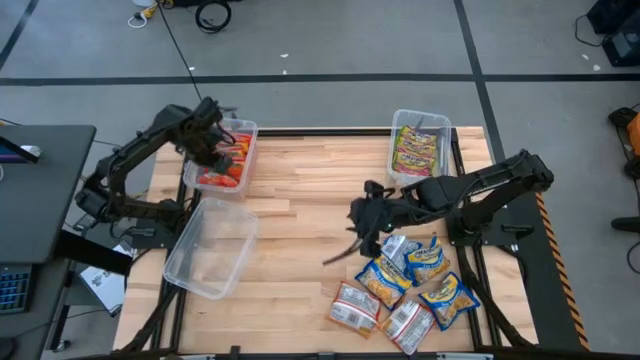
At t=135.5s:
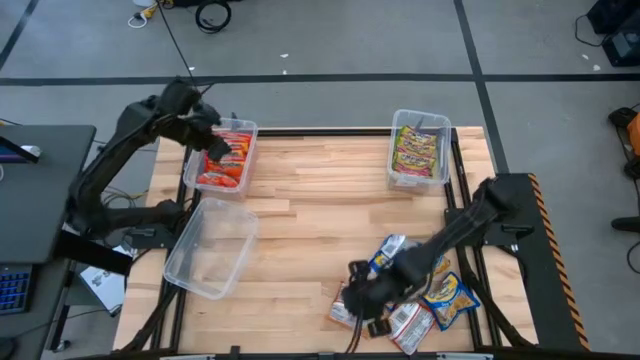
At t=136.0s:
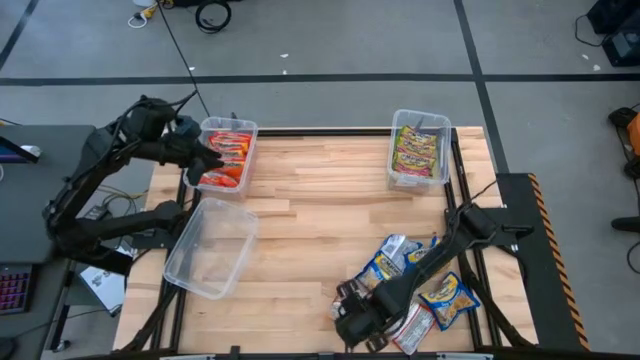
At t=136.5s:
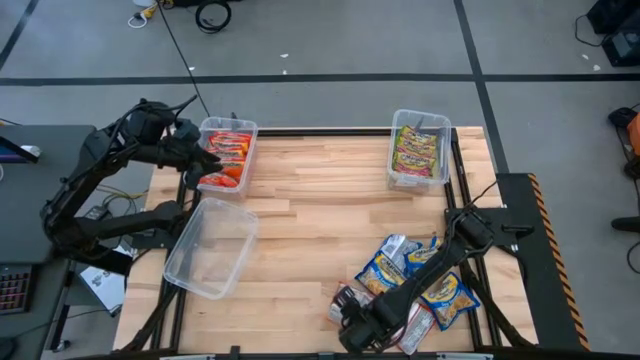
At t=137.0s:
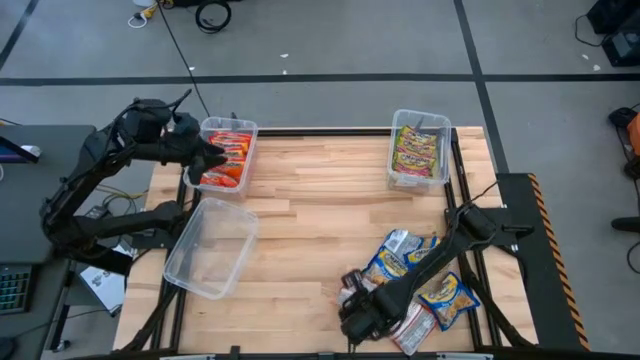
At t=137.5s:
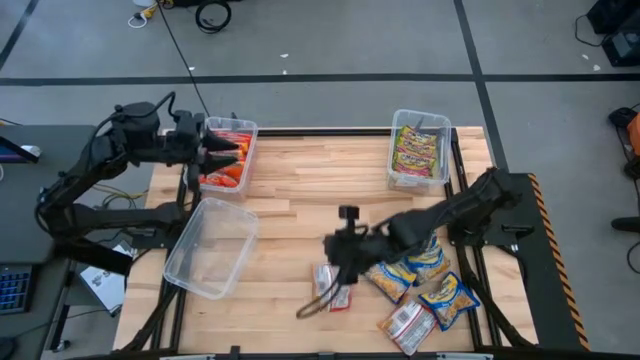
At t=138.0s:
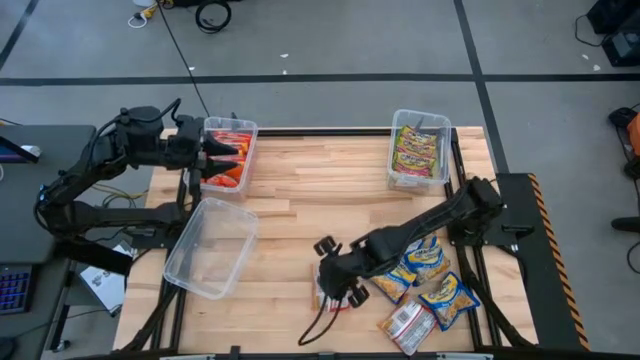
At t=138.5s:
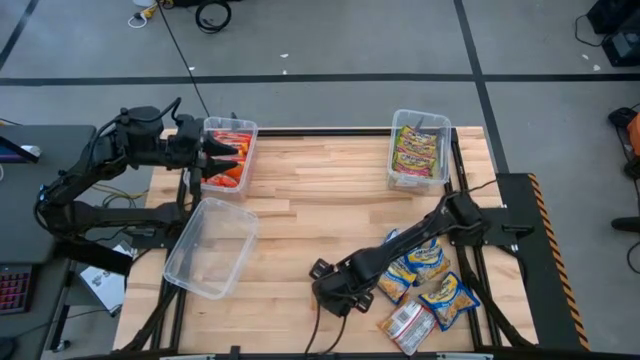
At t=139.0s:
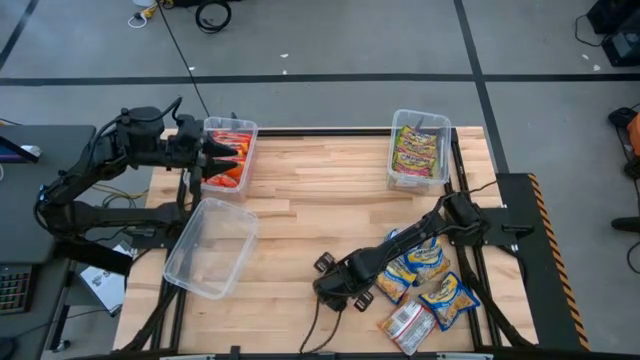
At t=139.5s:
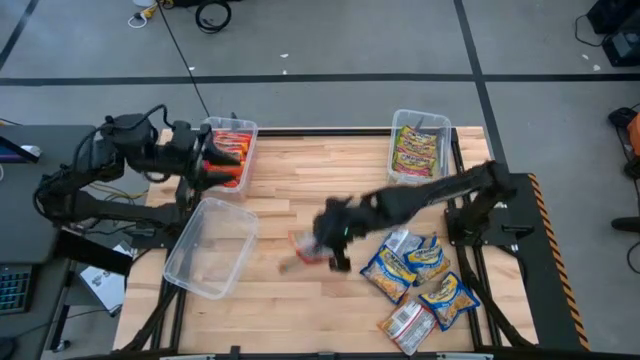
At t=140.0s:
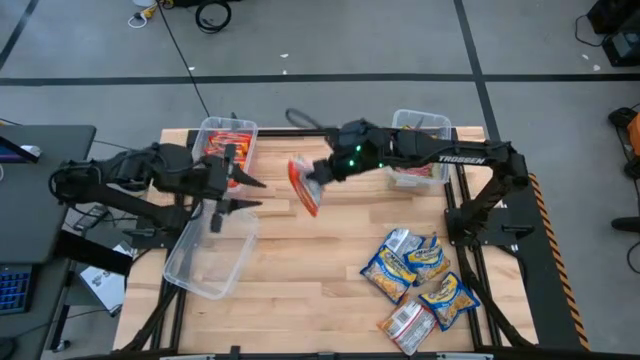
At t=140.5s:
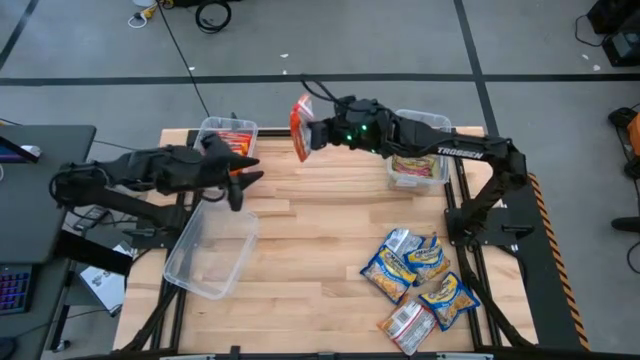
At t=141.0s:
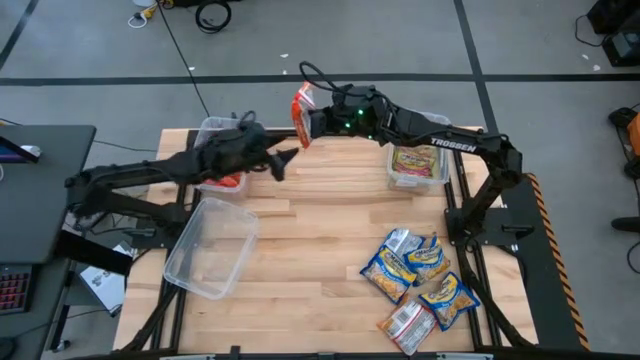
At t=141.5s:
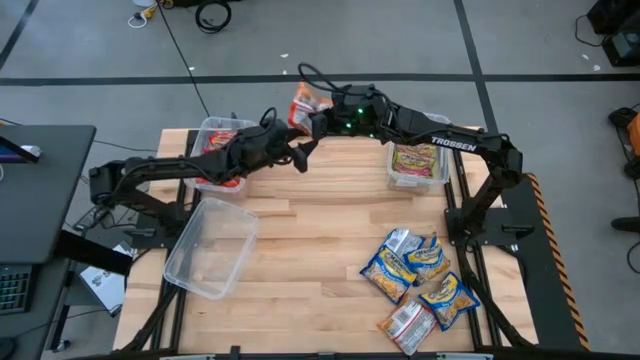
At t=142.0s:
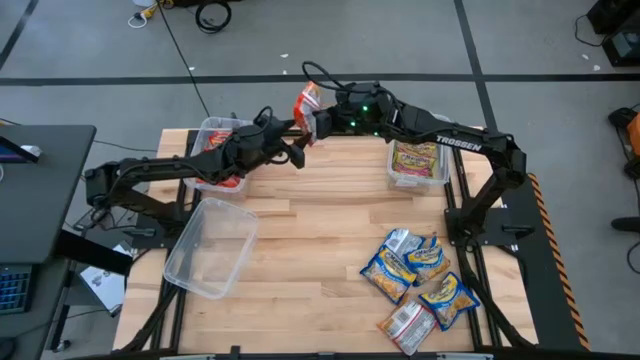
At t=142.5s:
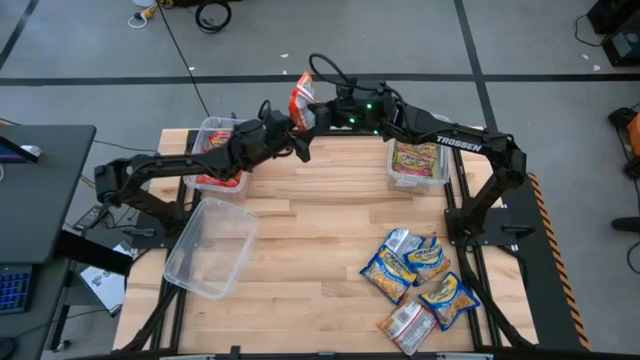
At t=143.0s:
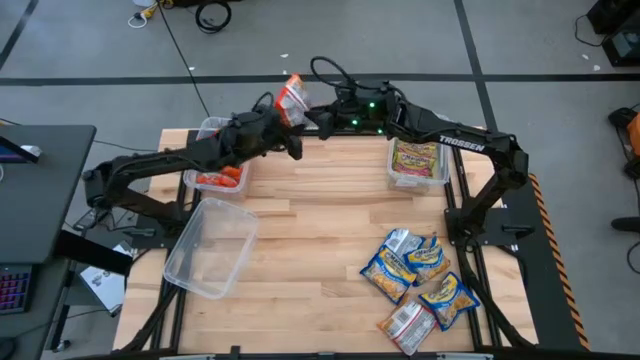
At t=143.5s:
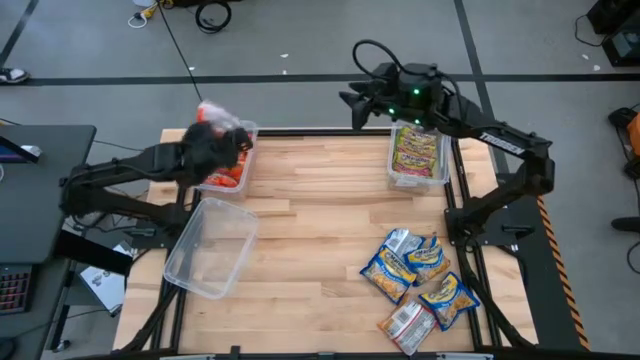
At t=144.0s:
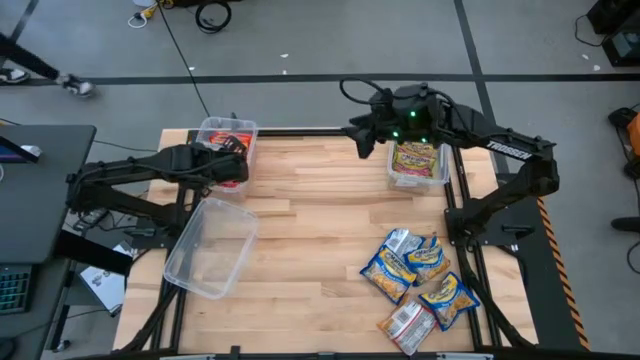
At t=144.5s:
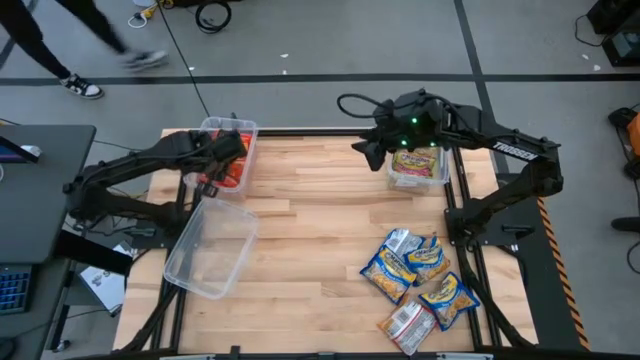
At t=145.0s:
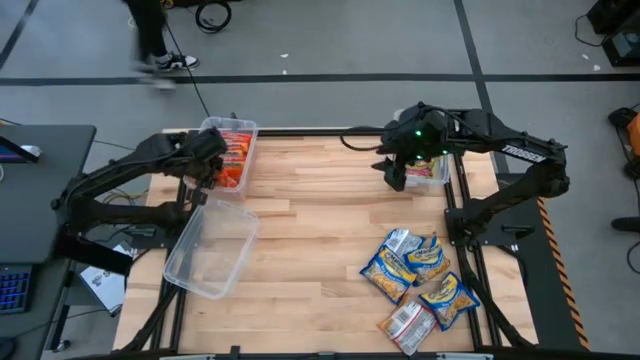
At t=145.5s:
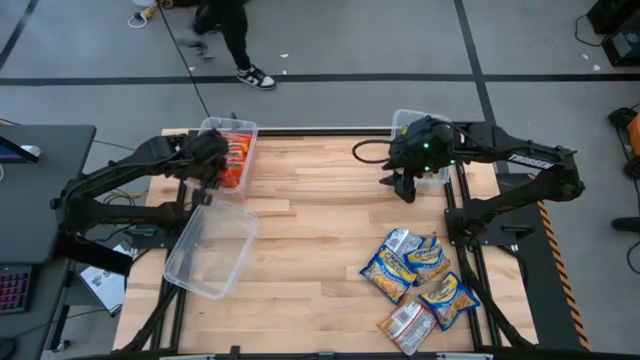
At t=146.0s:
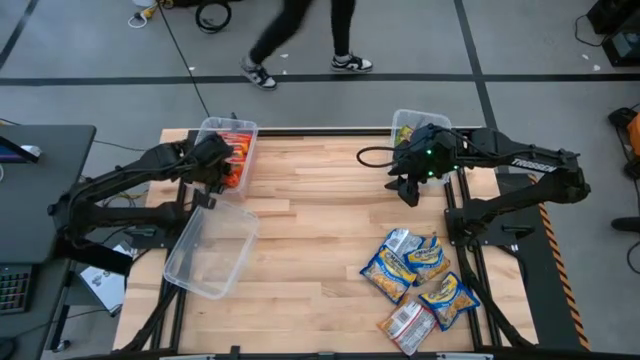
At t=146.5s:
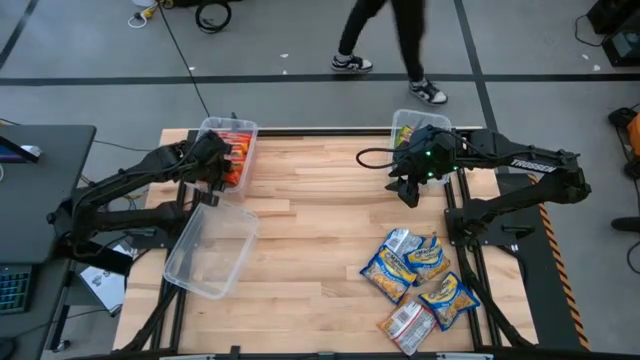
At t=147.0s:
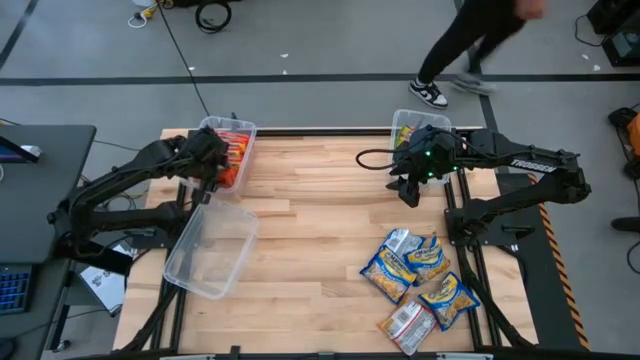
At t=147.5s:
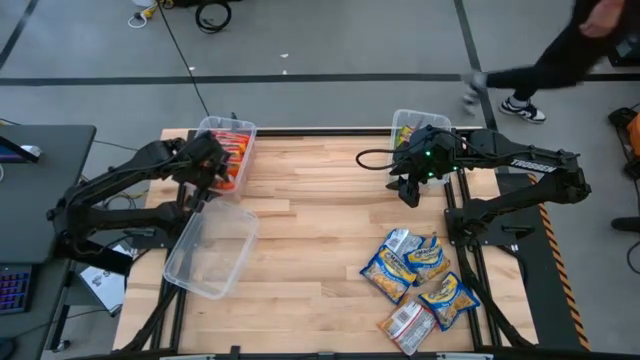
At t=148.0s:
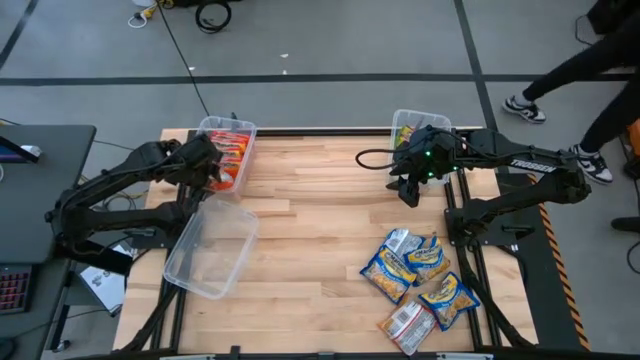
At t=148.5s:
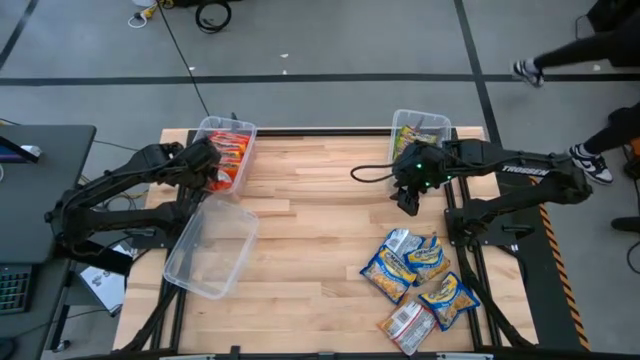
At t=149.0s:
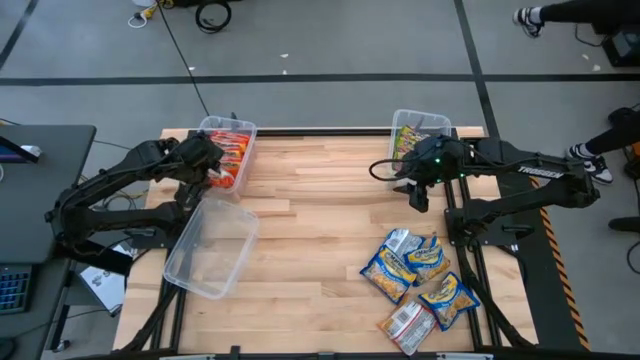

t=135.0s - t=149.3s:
Task: Sort Maruchan noodles
Put the orange noodle pack into the top left transparent bin

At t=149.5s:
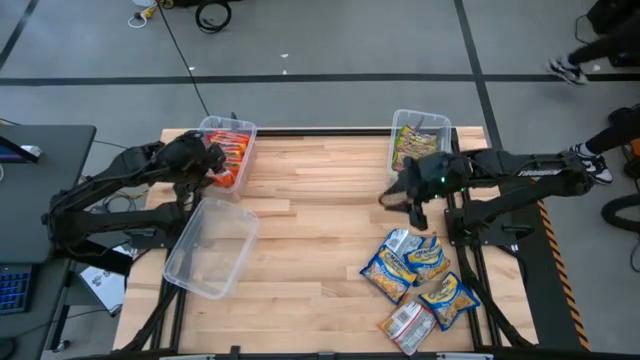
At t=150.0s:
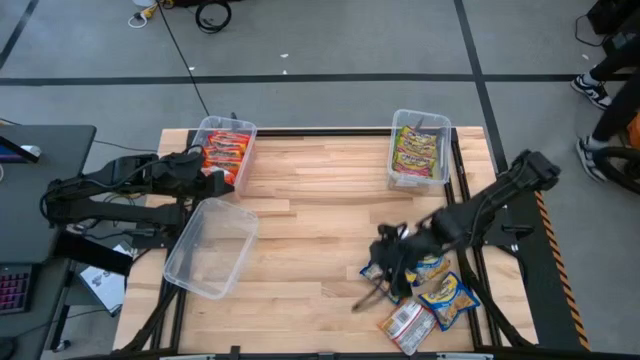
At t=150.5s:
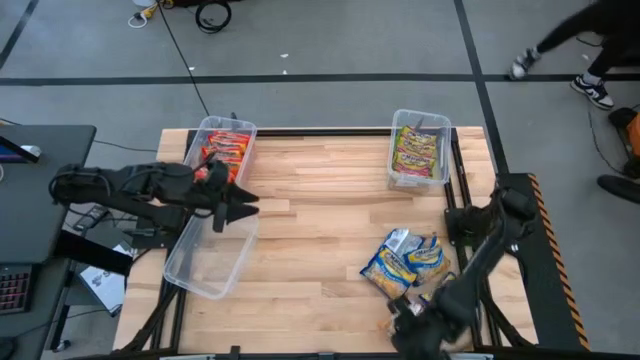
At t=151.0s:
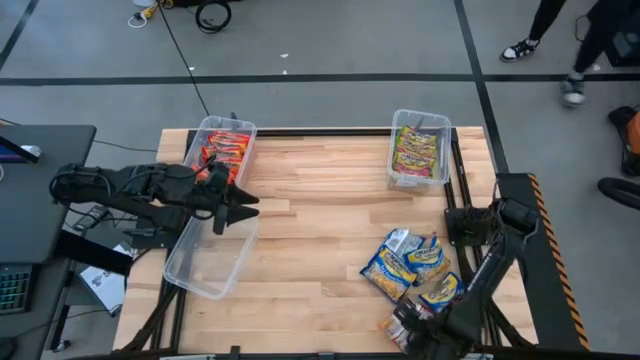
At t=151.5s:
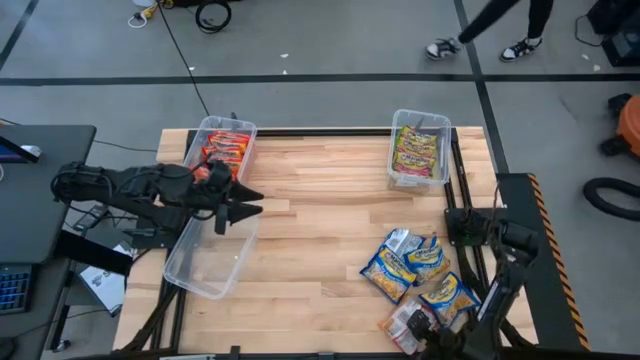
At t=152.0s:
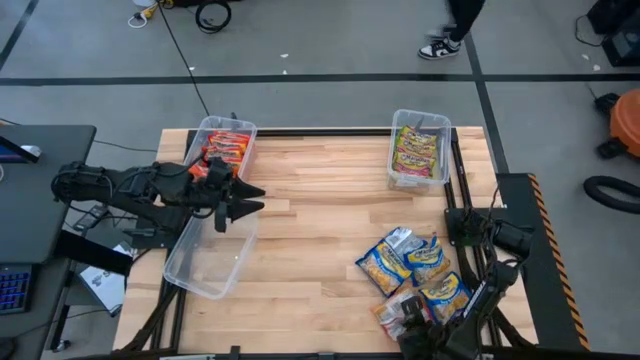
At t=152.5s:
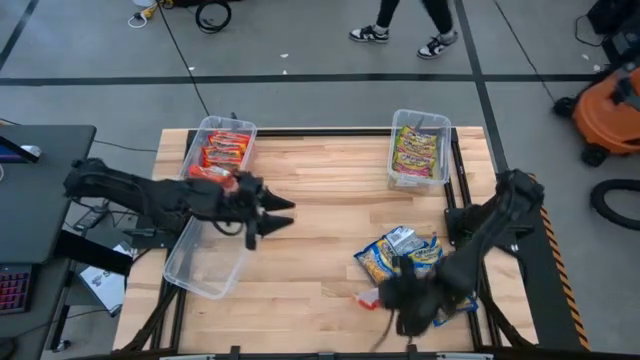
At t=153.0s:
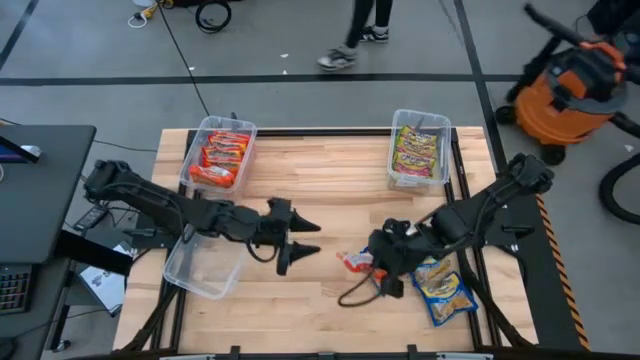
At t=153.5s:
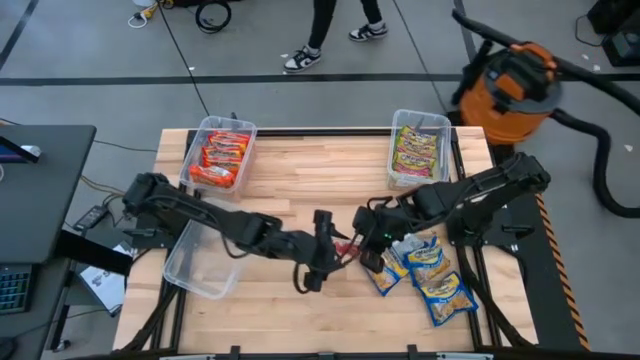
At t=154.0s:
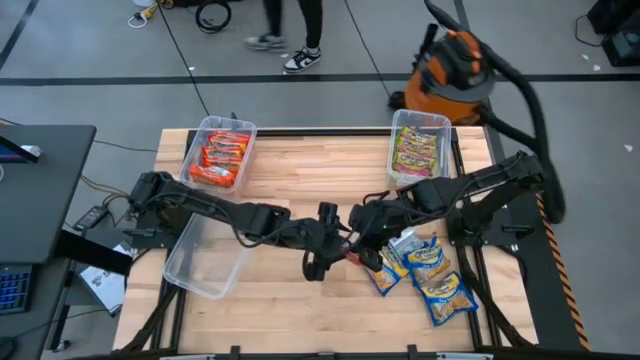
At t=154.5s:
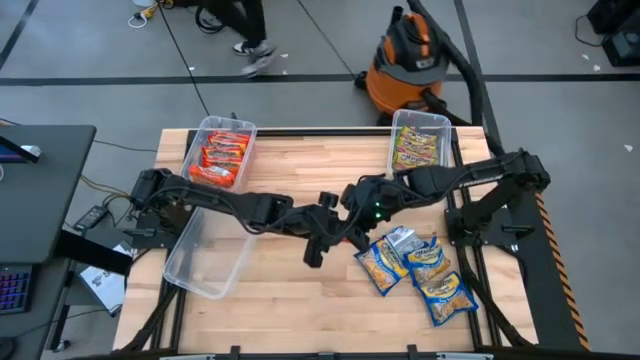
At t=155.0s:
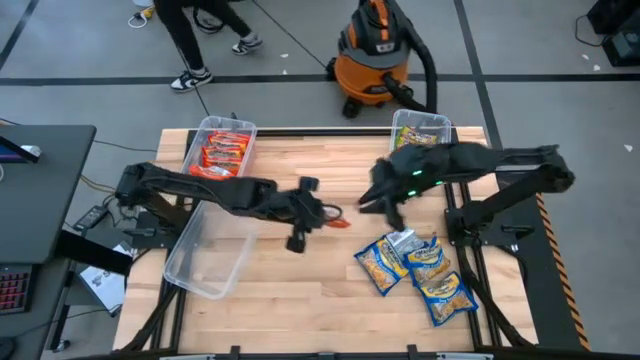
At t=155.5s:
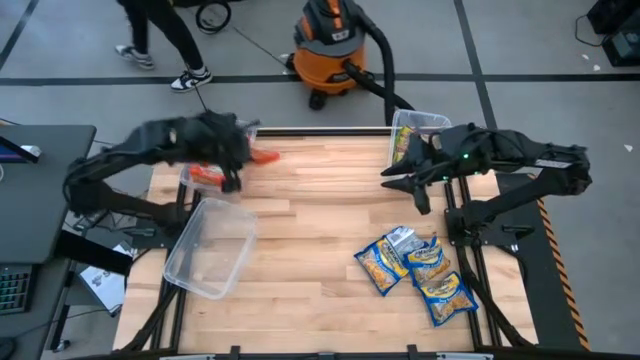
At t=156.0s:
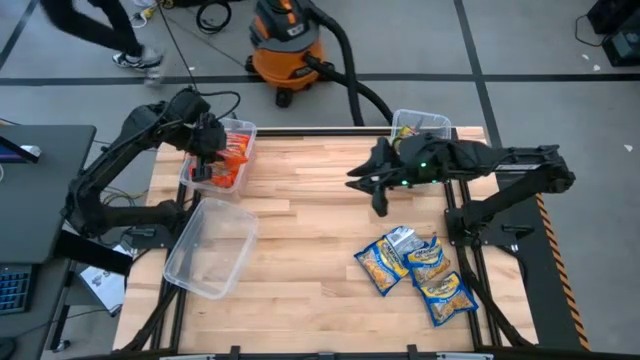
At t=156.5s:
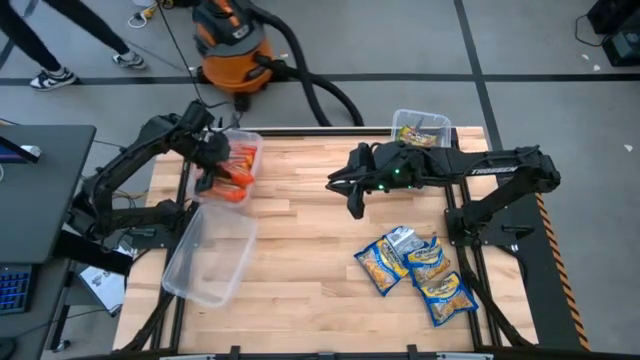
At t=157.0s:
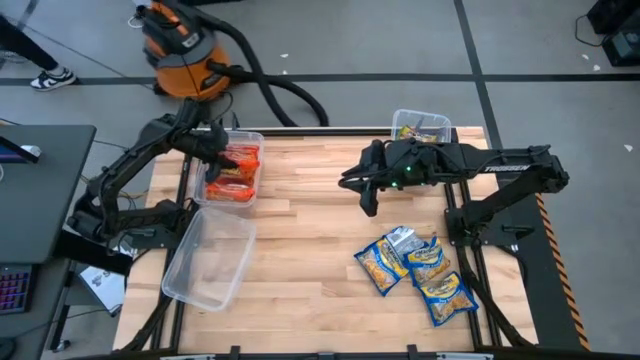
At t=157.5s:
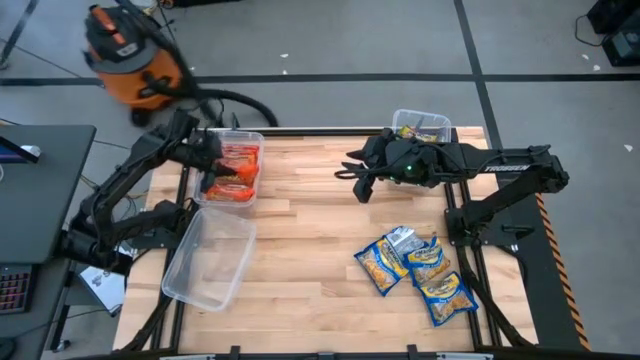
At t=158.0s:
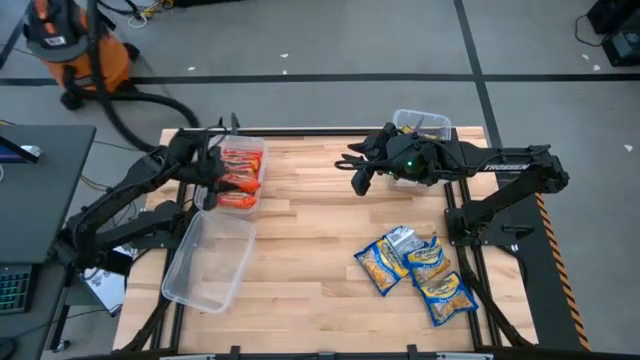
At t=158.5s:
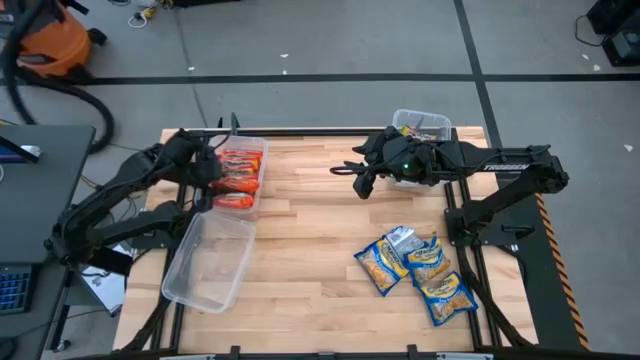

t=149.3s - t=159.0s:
Put the orange noodle pack into the top left transparent bin
